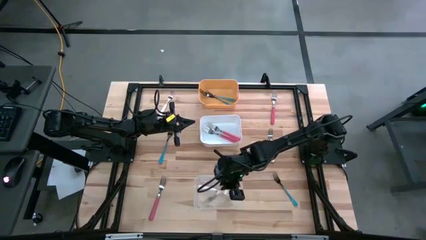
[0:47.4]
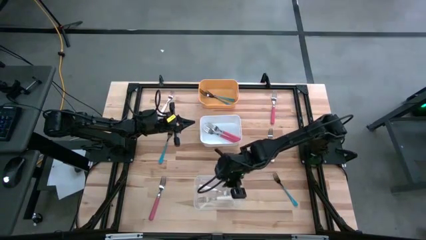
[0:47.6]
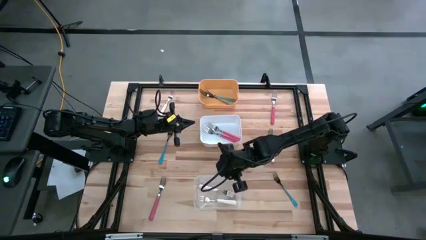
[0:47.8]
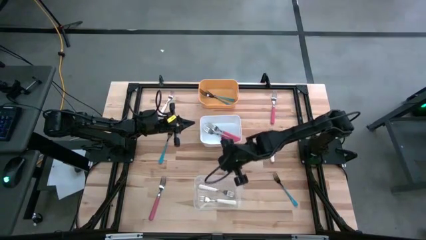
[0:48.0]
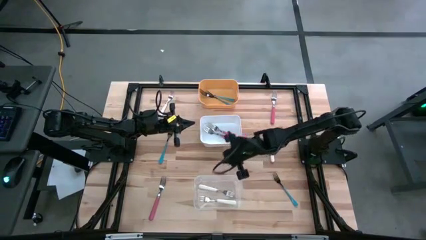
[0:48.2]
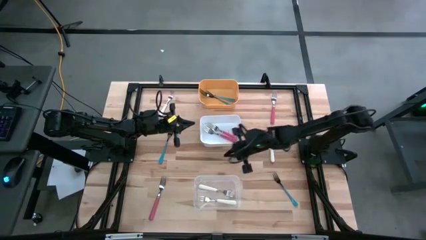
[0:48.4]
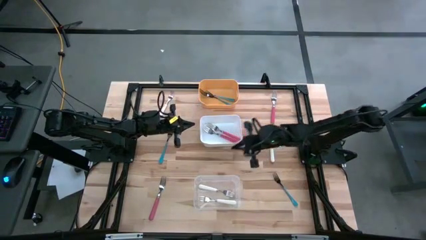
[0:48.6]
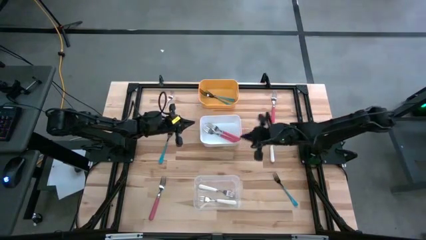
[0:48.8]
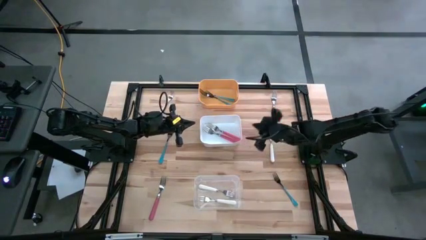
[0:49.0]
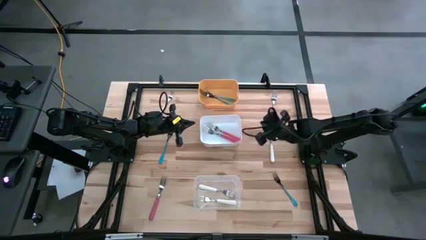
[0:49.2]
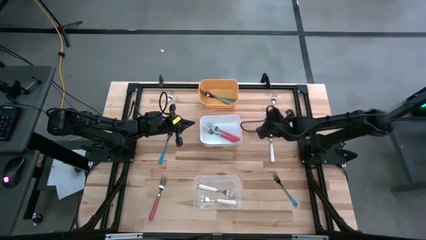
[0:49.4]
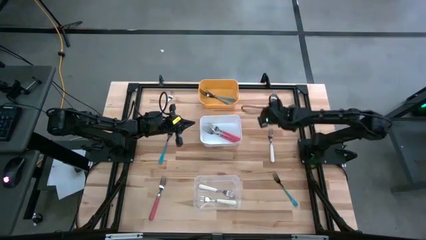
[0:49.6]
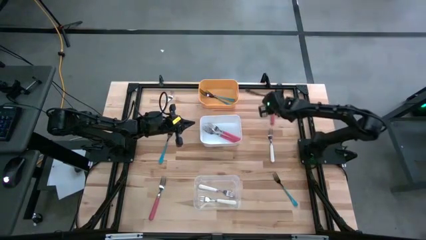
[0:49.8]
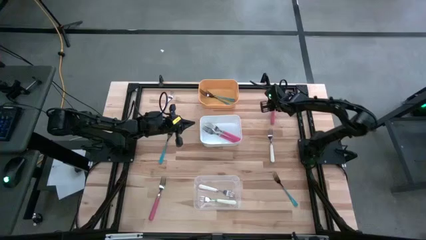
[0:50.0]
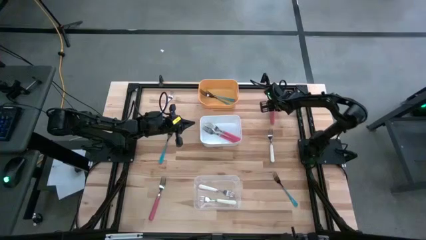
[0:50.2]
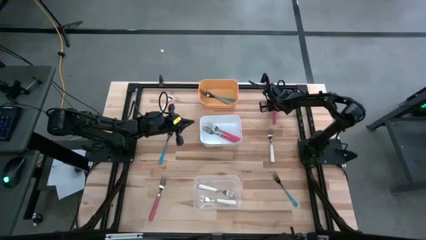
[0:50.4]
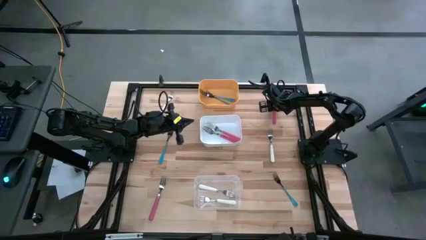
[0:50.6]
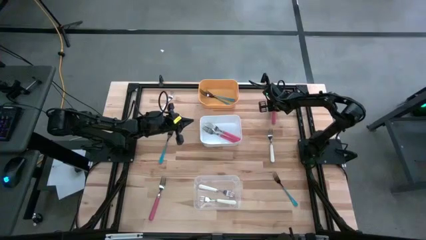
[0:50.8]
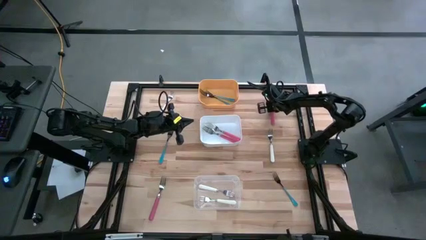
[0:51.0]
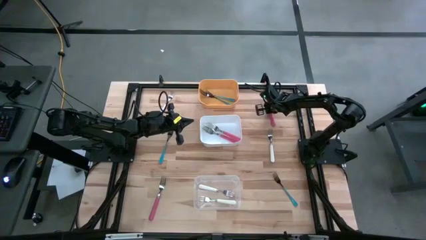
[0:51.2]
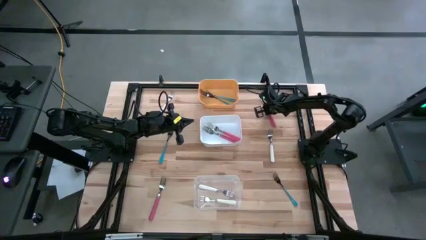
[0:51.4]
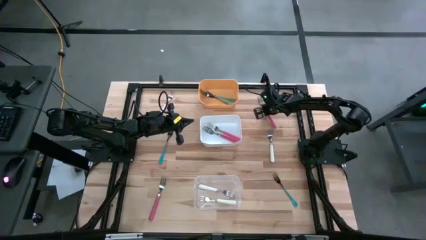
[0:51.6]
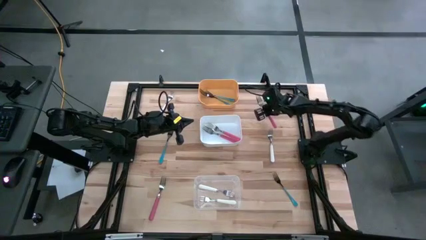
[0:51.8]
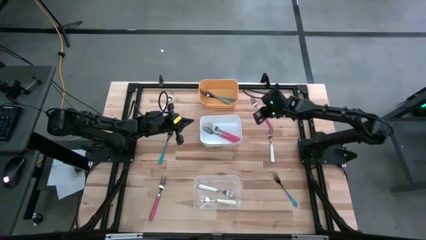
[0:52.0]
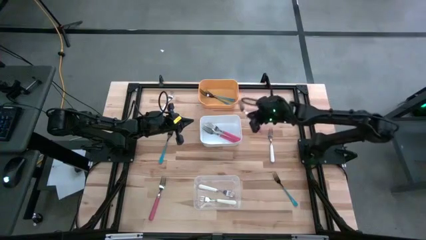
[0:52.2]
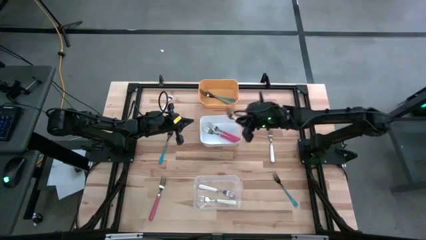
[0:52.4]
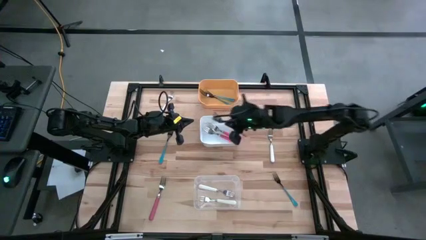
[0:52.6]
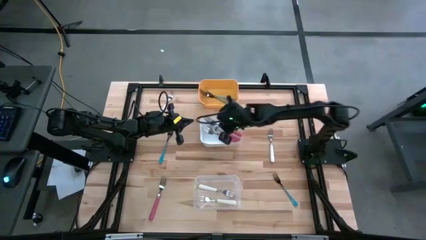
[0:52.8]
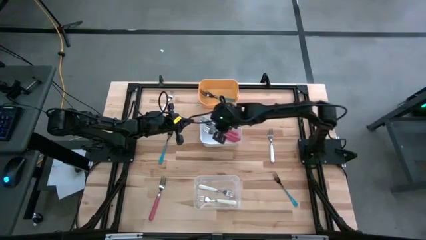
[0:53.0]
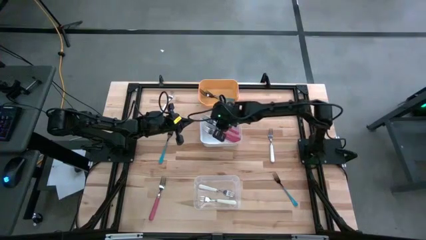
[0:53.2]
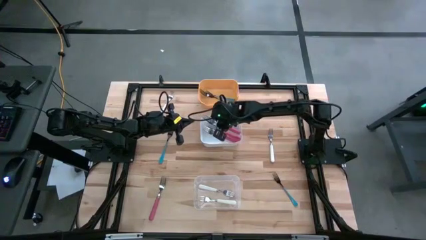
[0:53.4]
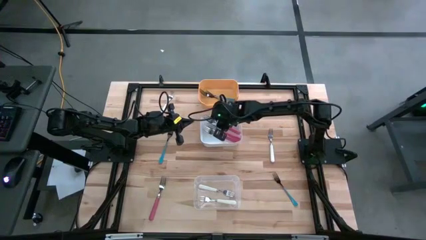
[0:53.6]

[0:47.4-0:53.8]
Task: Sort silverware by color (type)
Put the top right pink fork into the white bin

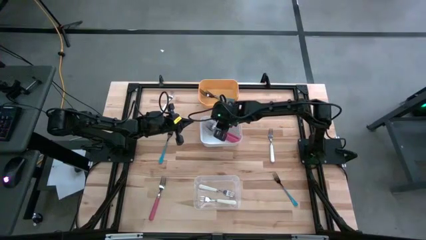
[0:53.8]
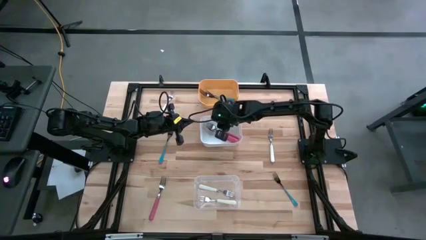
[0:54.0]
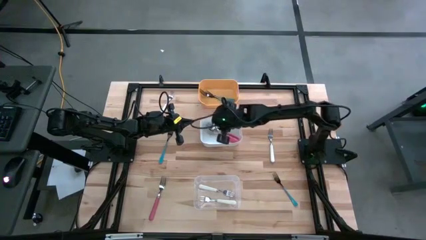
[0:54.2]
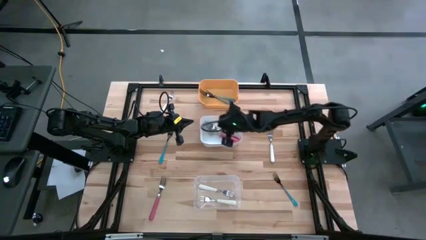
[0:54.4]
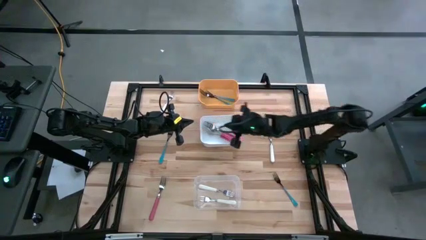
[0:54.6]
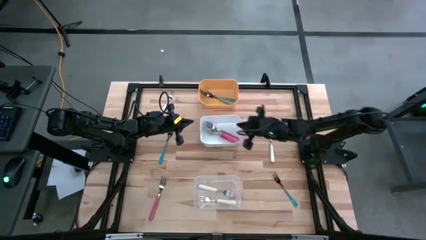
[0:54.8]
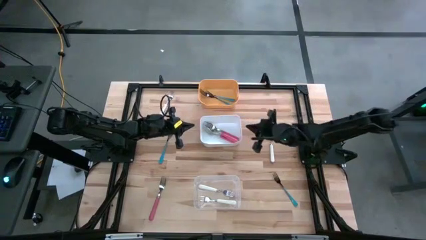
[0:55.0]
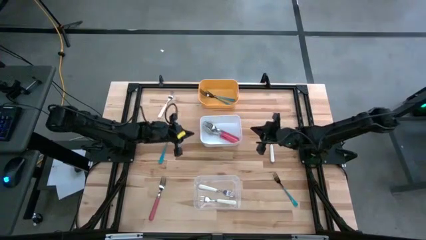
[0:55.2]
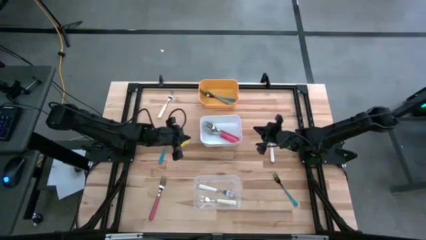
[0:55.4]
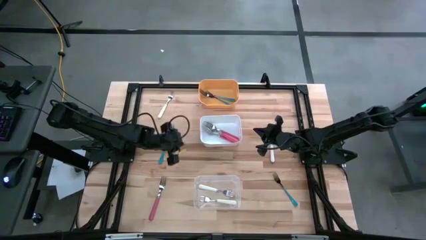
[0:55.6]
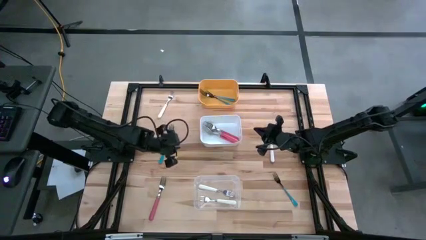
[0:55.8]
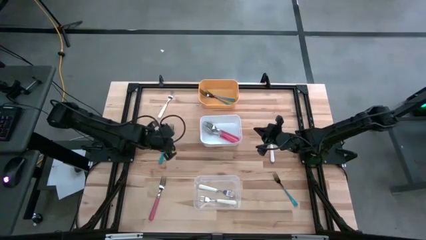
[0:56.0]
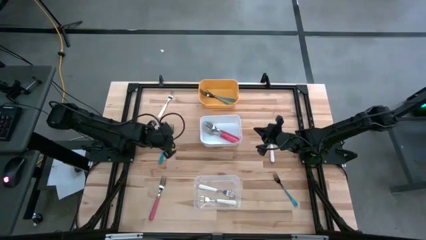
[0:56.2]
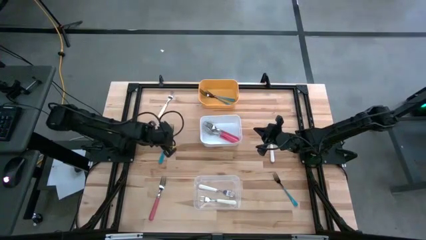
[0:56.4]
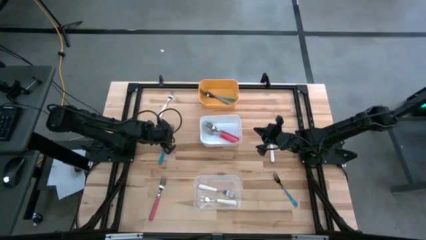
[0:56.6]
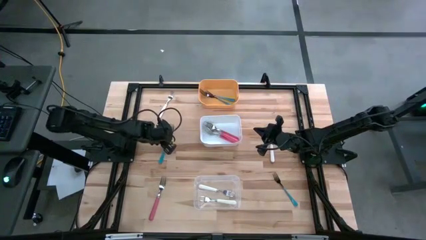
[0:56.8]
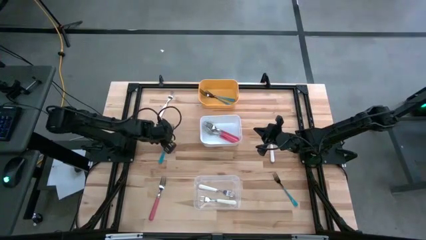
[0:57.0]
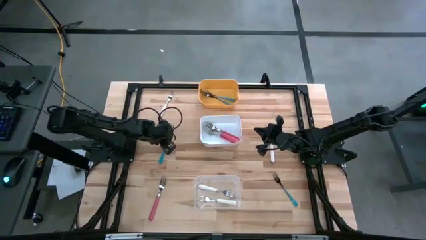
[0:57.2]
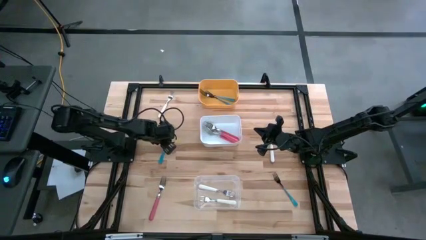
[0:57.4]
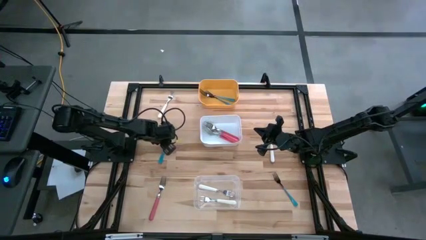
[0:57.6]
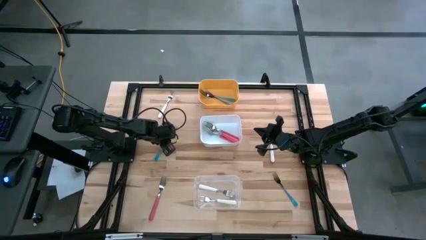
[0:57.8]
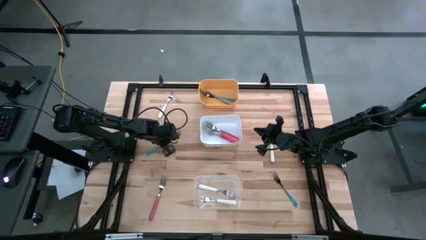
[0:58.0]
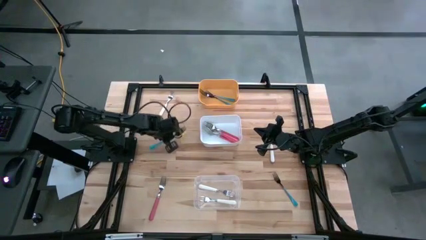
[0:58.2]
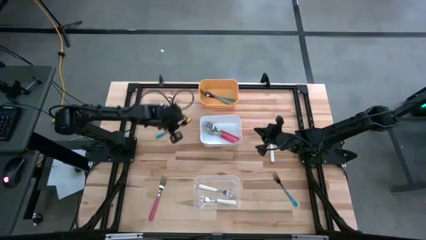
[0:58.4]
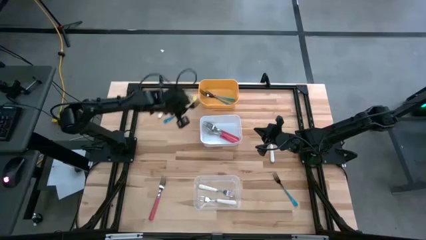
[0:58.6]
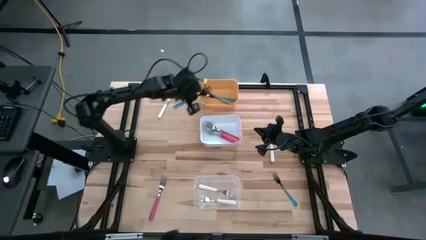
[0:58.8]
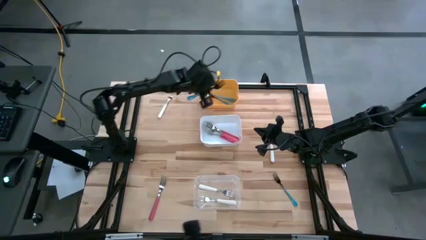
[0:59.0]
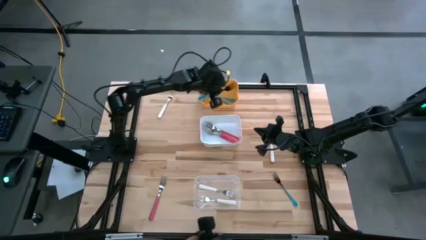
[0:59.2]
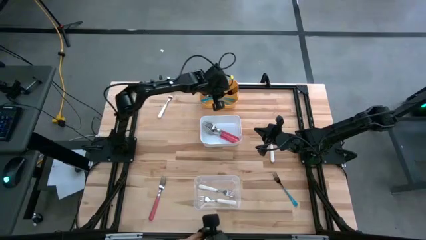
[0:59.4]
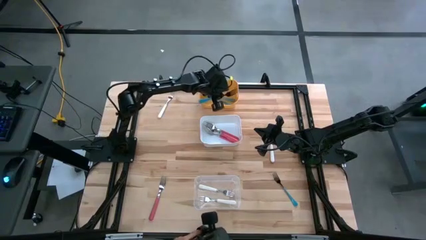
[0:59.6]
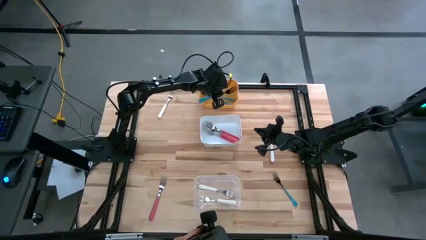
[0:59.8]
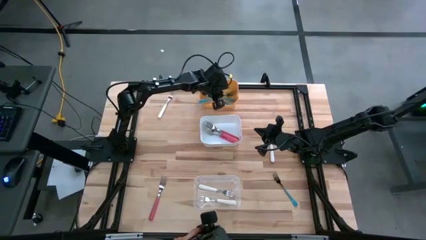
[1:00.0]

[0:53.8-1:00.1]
Put the top left blue fork into the yellow bin

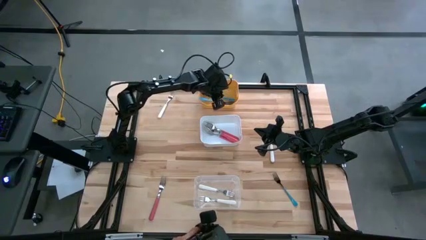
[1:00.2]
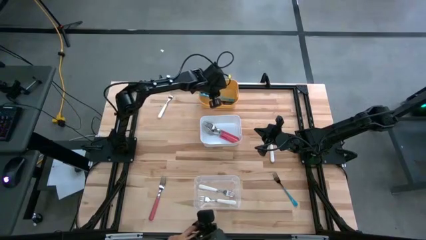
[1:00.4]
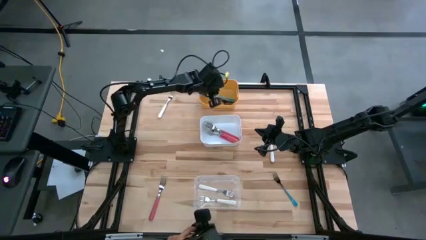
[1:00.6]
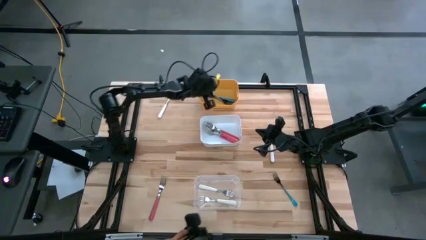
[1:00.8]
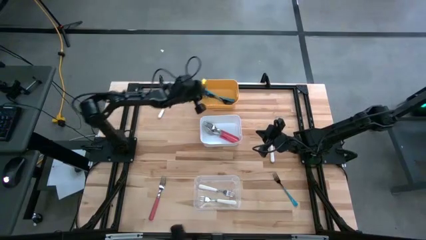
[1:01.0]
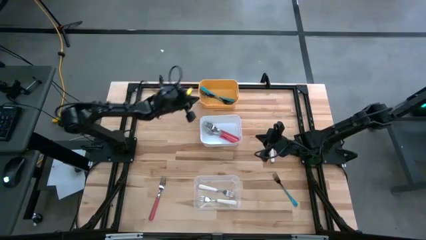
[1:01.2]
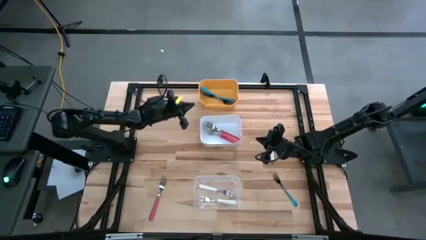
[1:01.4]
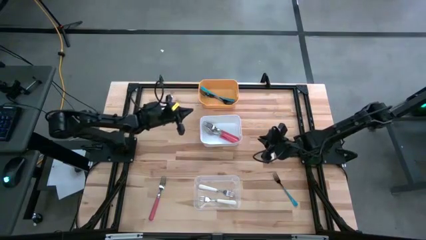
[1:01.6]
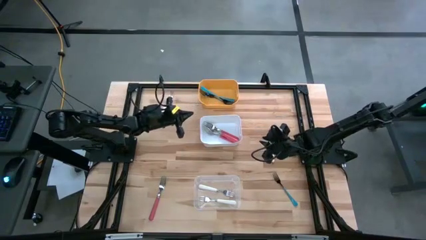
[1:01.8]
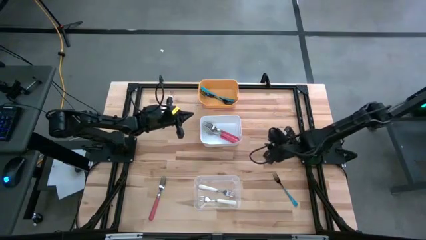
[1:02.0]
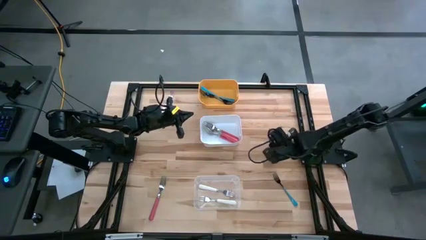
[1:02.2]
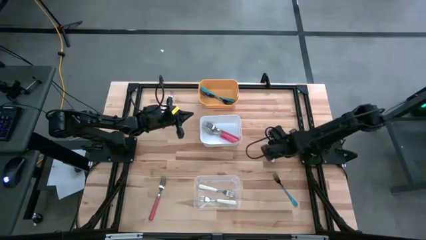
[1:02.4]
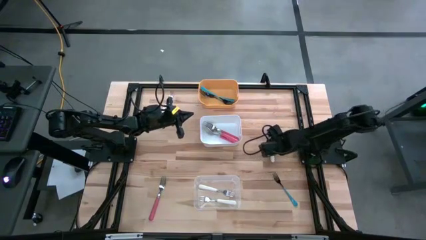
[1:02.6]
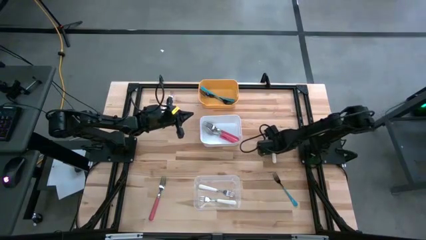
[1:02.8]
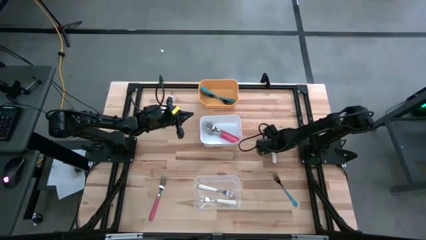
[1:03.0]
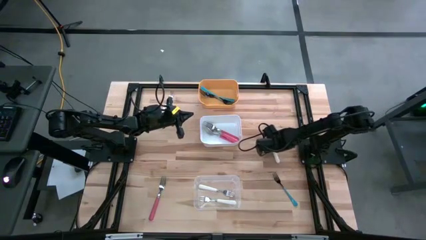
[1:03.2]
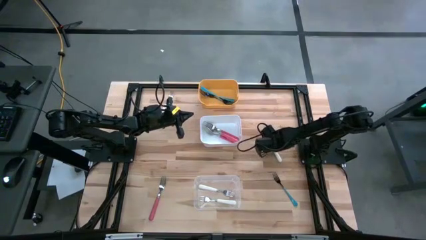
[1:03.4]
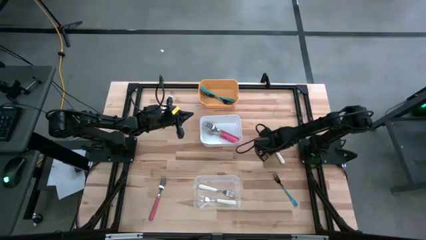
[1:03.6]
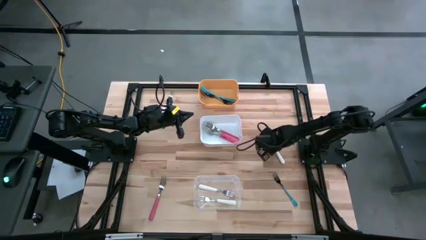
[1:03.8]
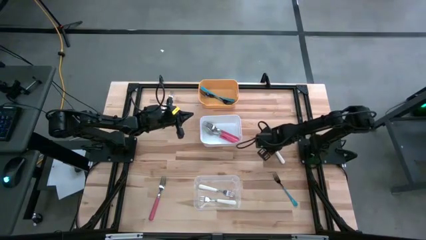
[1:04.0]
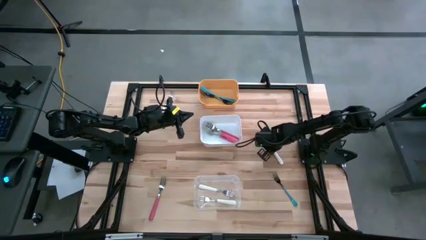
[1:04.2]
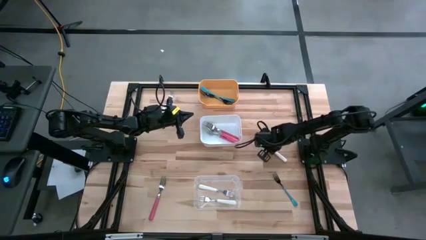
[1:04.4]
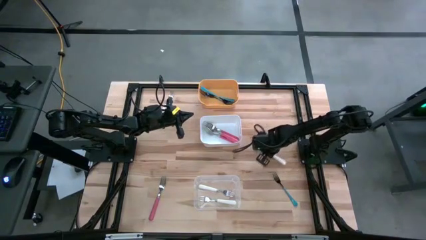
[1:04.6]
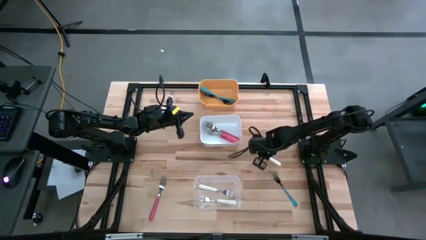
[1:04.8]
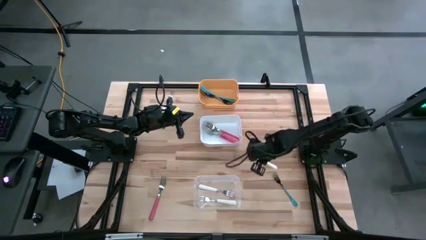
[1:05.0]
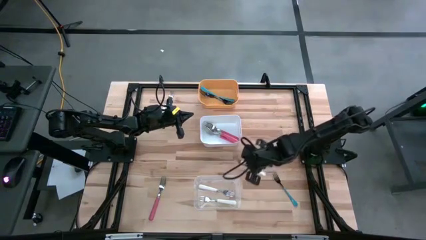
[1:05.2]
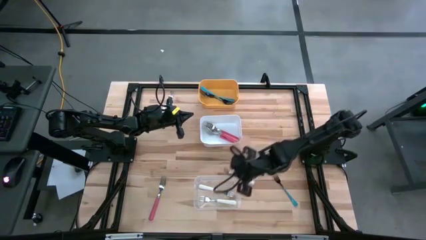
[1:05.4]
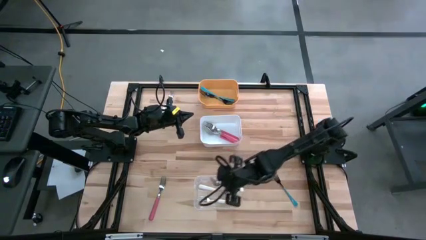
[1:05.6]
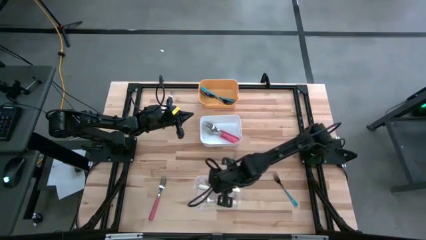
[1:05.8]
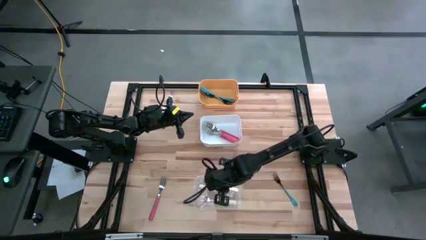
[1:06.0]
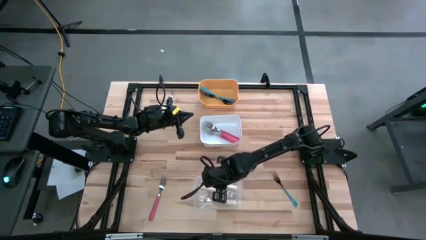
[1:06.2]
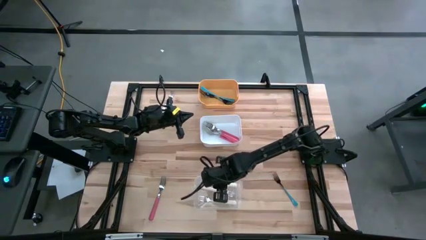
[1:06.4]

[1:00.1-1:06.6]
Put the bottom right white fork into the transparent bin
